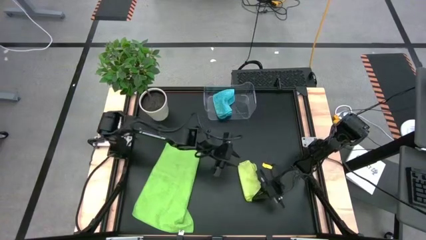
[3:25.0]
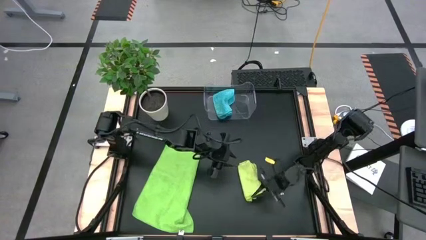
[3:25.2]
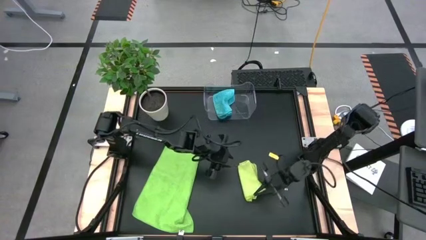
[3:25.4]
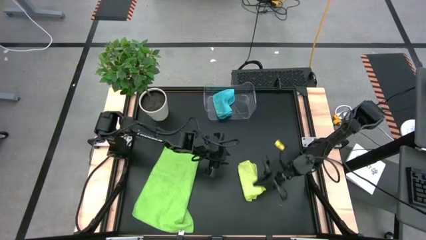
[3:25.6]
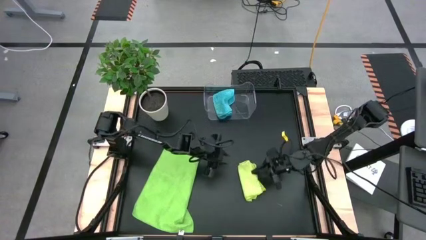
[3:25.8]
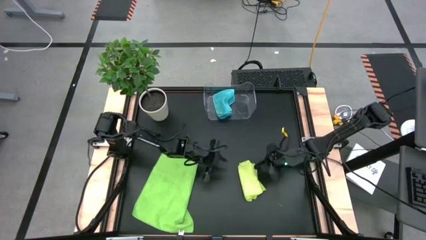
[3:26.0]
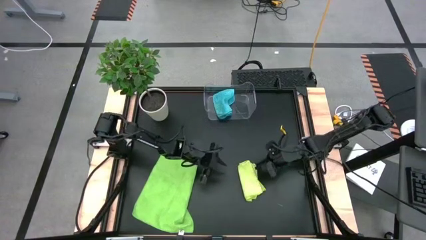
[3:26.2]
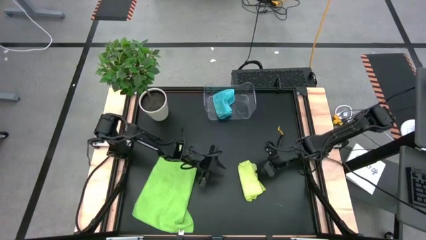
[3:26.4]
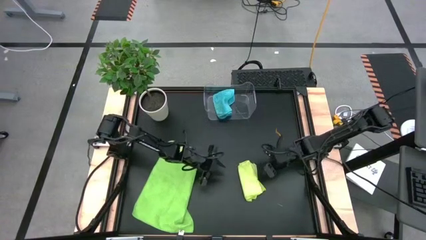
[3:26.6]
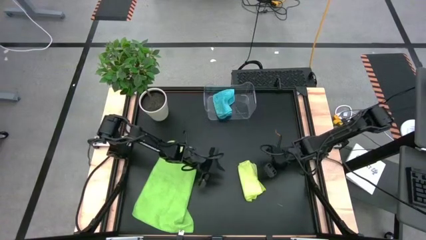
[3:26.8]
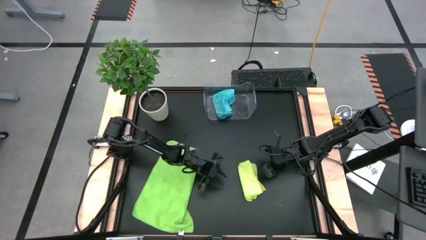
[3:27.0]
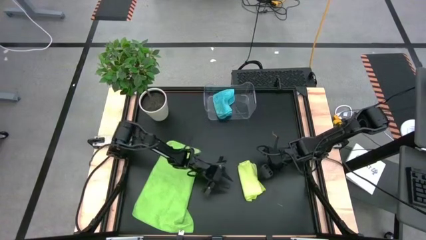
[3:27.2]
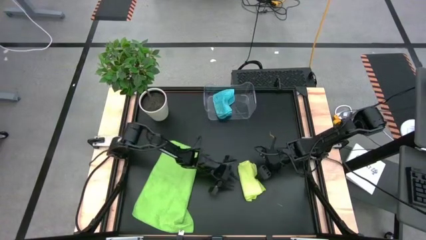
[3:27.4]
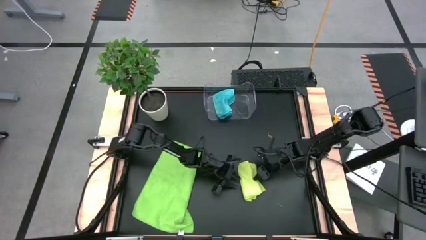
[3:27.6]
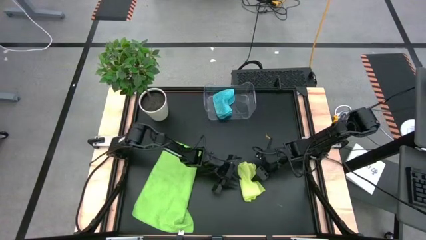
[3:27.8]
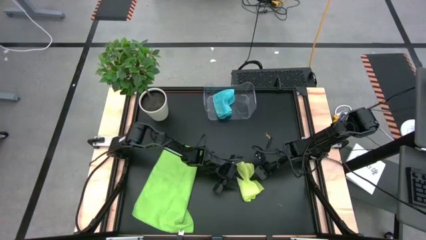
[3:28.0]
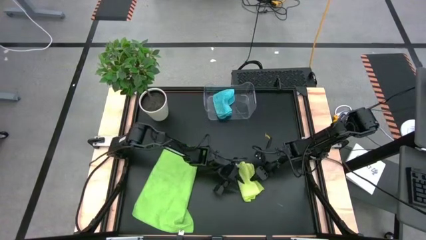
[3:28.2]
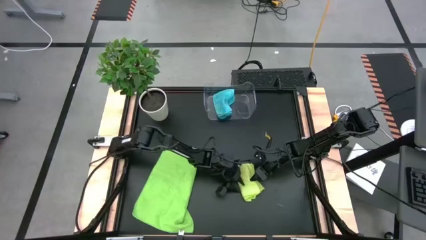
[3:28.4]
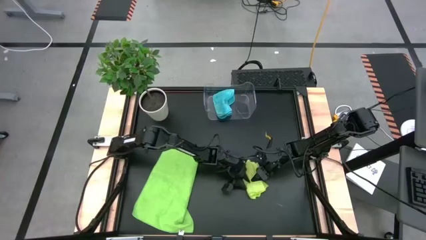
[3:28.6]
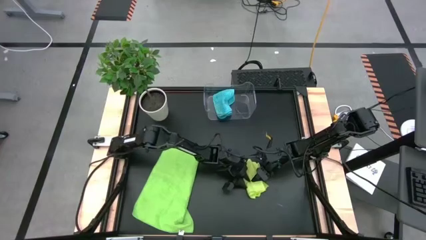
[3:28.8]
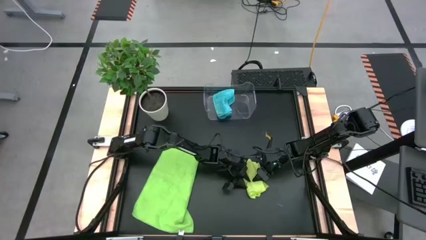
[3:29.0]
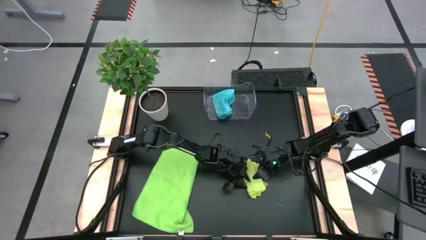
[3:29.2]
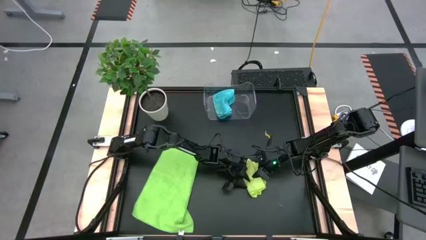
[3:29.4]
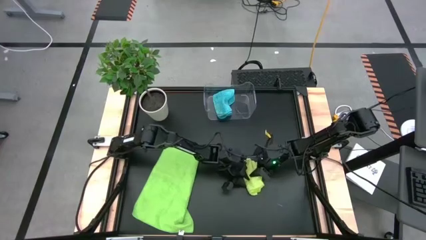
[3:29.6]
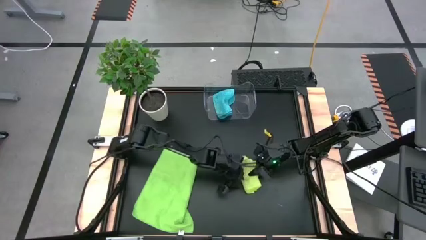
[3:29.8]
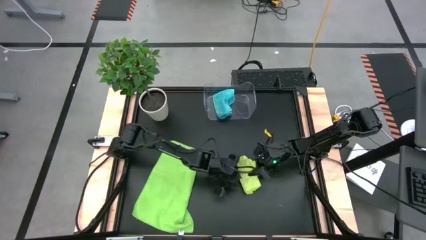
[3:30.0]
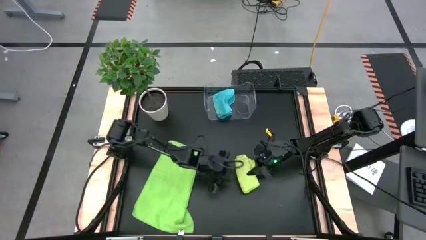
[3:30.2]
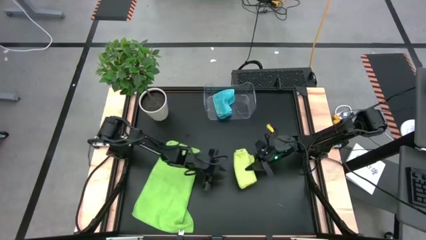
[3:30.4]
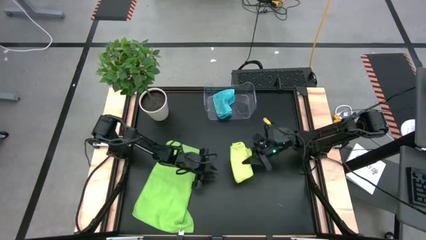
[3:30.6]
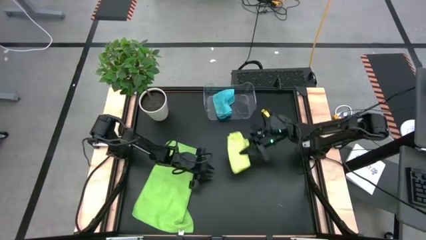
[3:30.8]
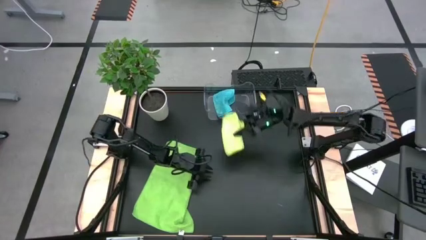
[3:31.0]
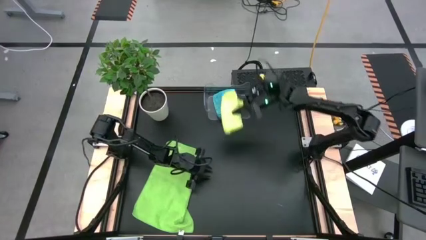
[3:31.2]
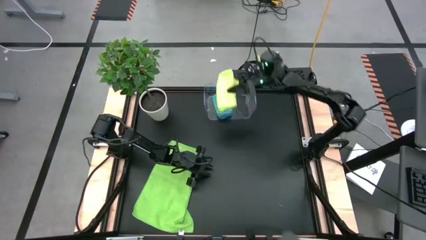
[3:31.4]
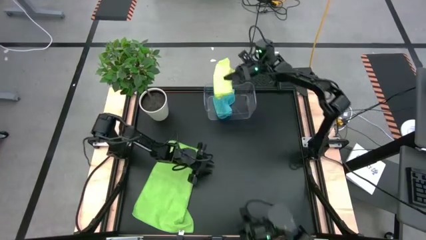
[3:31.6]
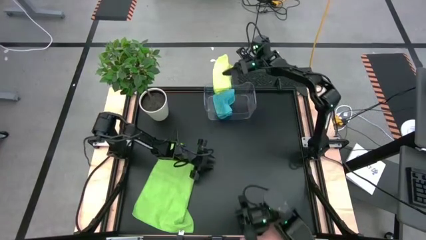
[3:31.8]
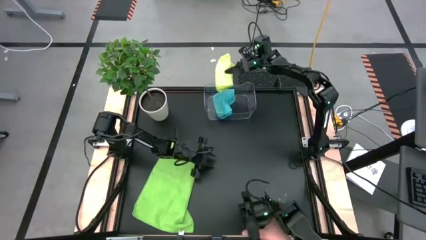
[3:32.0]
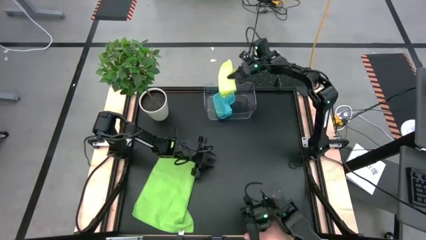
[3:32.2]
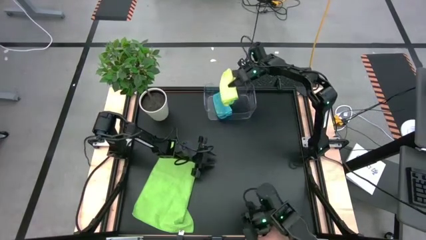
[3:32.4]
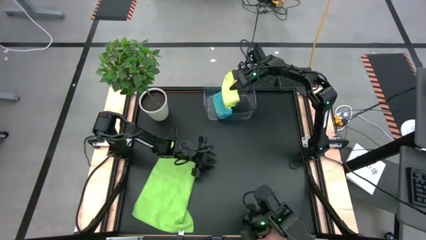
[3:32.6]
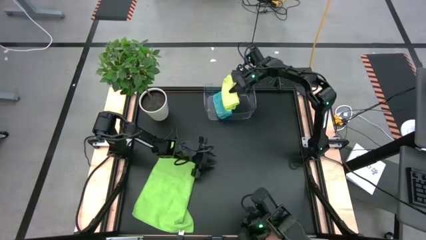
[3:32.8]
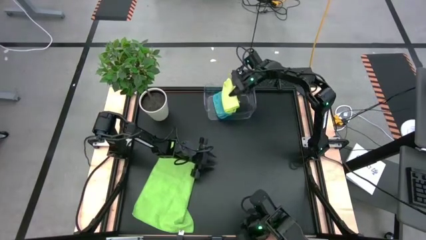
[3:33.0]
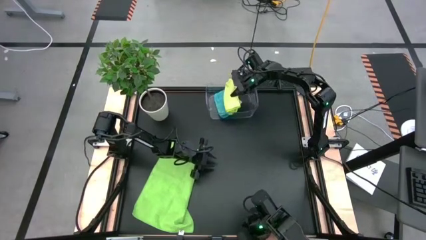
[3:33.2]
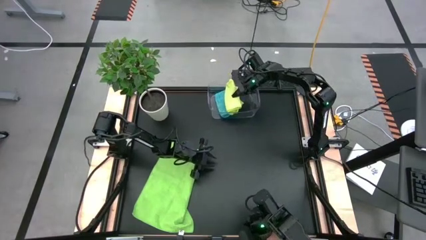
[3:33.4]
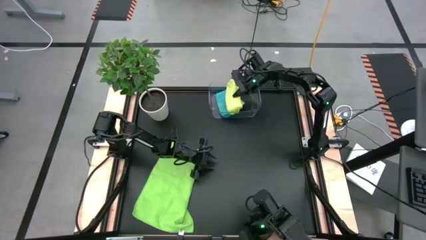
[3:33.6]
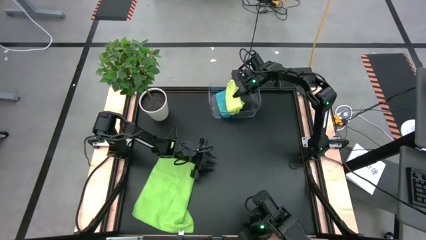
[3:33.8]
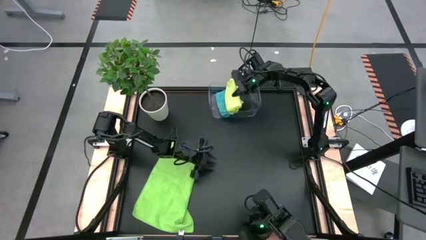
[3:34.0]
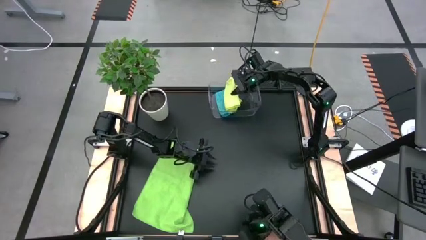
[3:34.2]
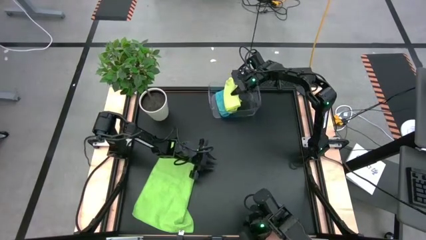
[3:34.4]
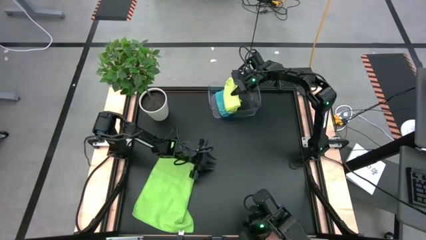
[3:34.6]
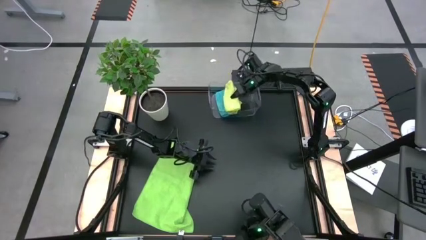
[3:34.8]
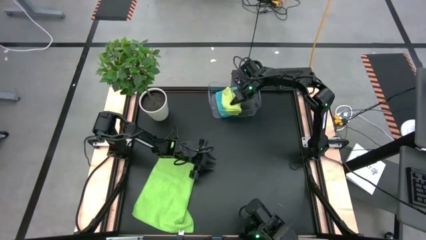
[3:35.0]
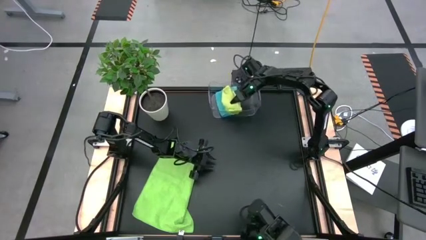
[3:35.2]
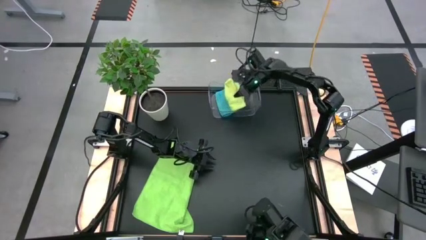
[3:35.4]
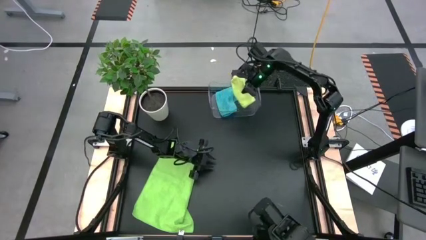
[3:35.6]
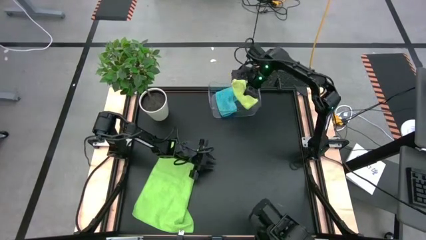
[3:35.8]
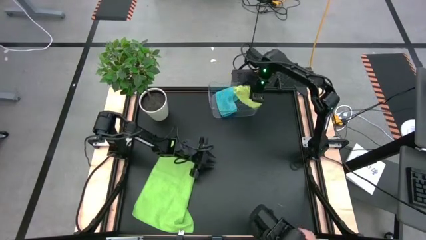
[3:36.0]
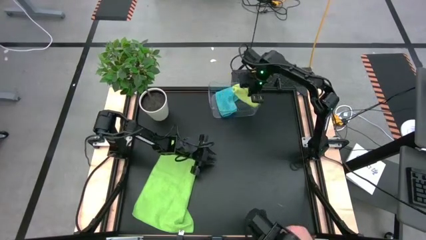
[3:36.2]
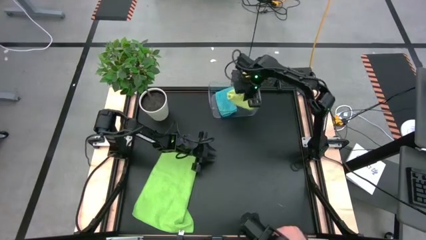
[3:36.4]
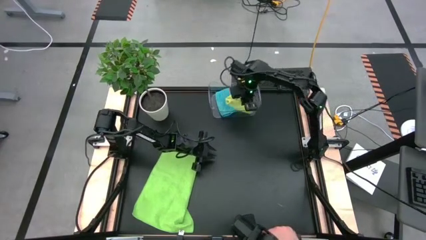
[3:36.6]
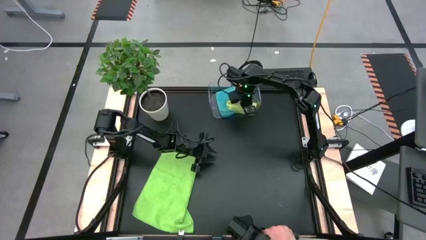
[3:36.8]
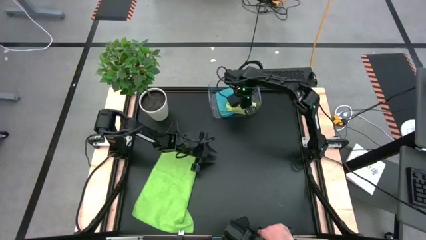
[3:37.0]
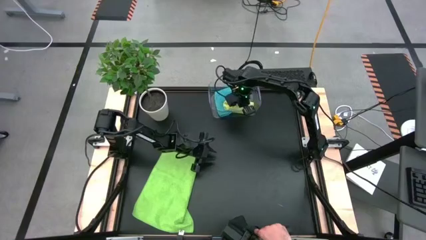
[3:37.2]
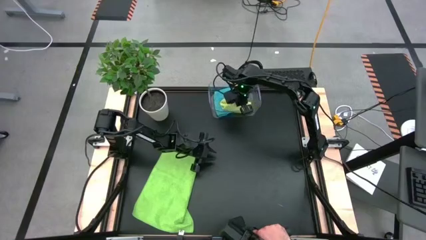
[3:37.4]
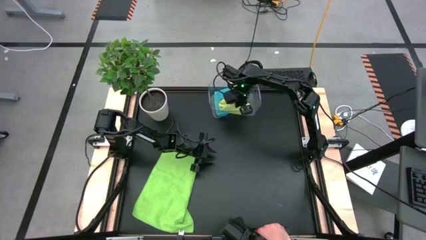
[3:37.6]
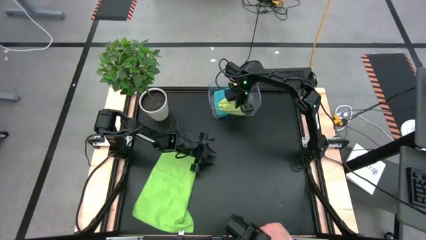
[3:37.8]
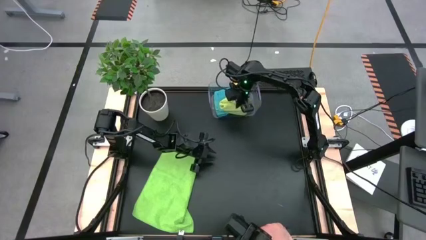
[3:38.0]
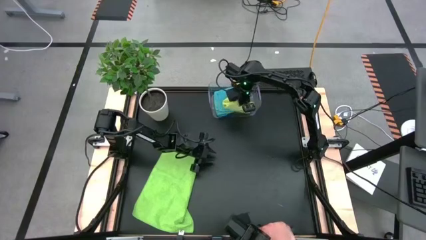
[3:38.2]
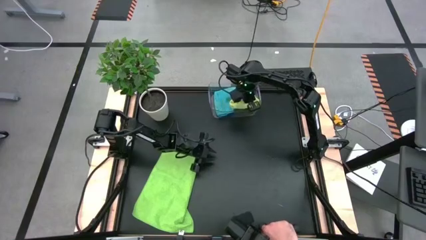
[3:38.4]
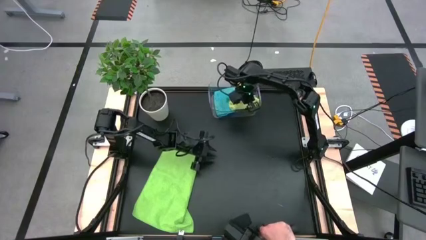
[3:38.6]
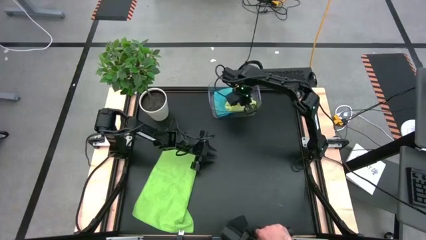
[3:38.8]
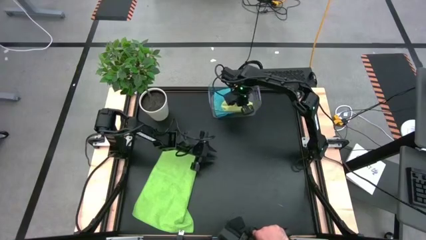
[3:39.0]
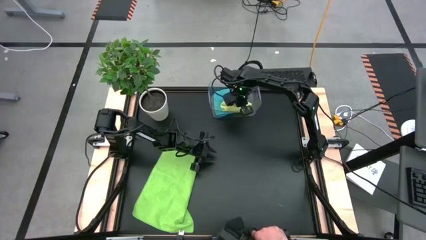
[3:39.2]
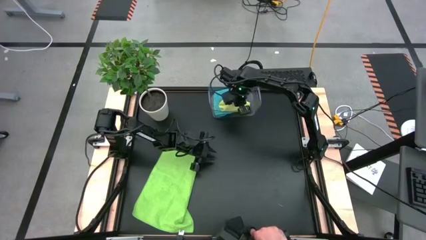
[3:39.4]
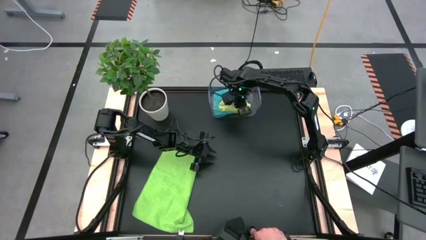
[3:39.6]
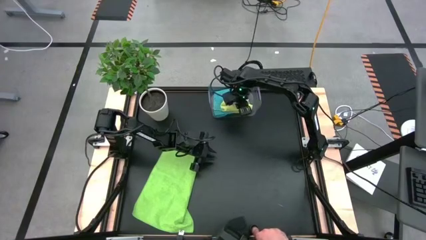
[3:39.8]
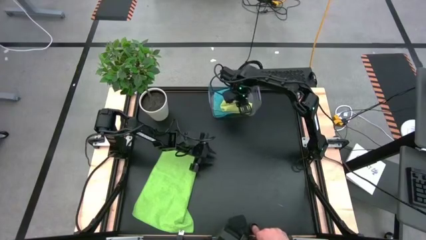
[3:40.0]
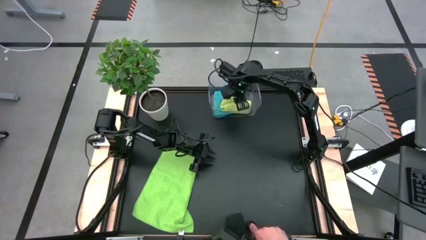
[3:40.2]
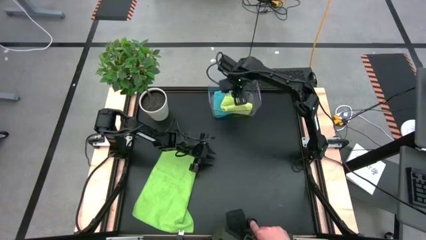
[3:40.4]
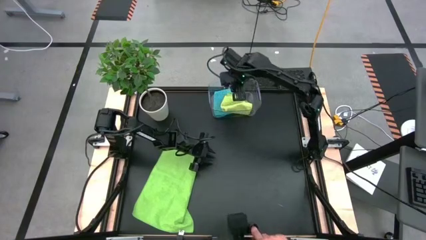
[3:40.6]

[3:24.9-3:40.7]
Task: Fold microfiber towels
Put the folded light green microfiber cloth into the transparent bin

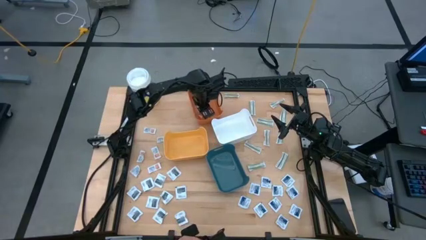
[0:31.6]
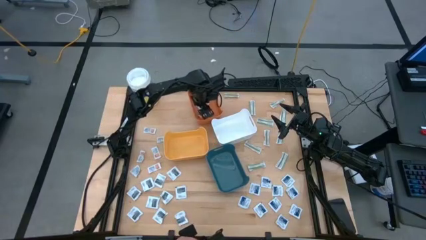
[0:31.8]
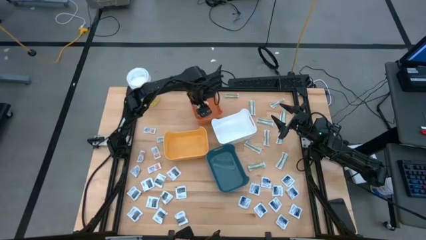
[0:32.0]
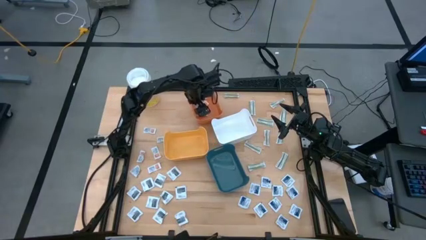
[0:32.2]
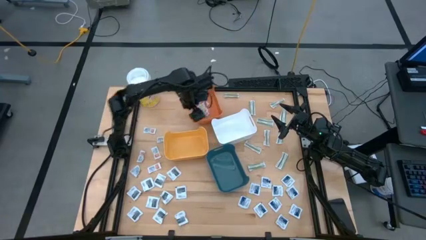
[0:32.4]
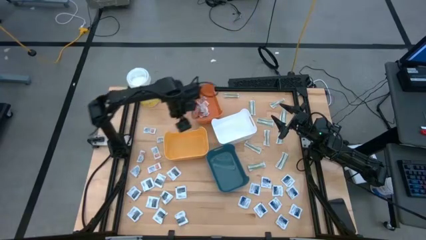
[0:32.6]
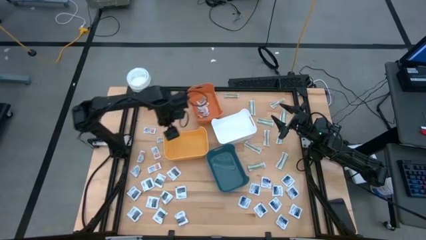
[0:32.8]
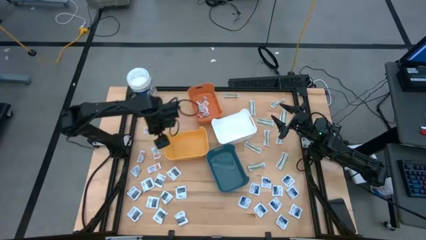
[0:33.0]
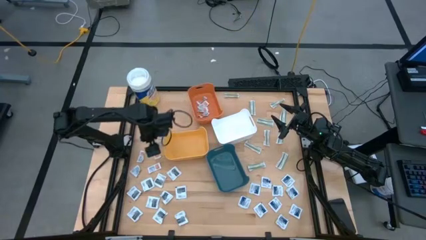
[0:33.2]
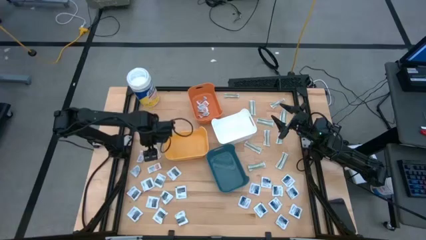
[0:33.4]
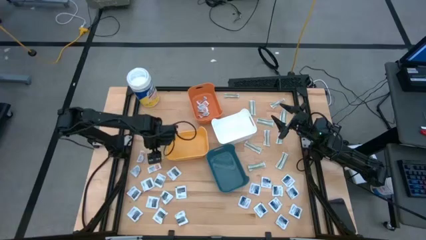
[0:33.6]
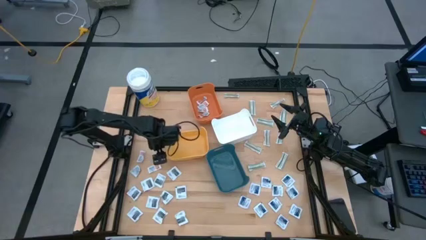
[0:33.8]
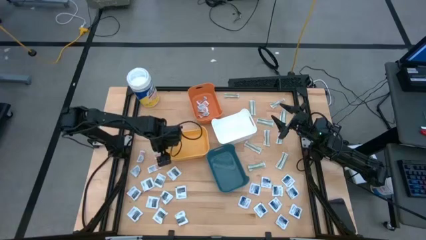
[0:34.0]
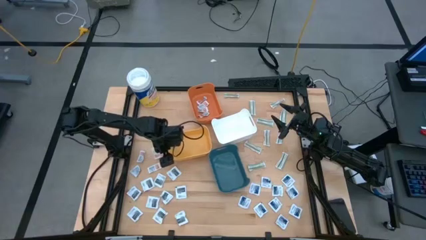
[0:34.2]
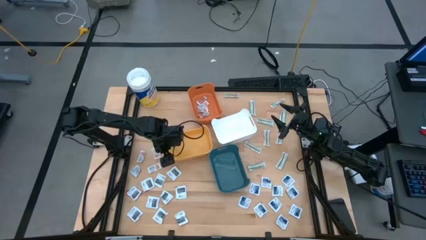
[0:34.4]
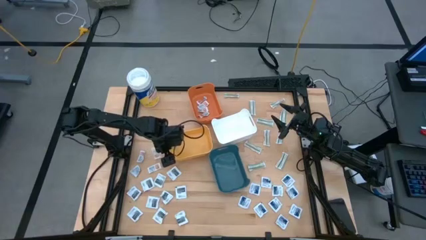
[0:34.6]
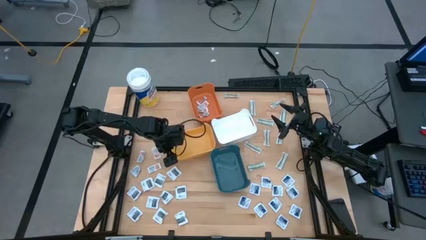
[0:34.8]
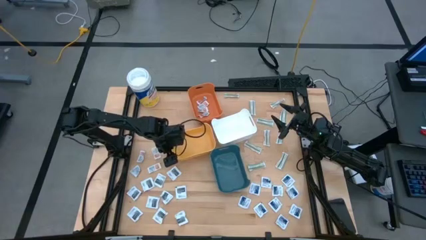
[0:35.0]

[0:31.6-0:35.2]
Task: Pick & Place First Aid Supplies
Adjust the yellow bin
